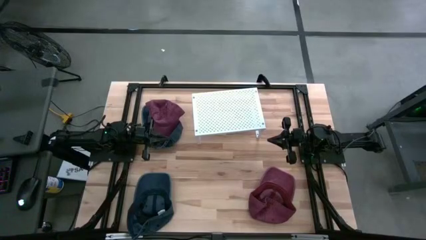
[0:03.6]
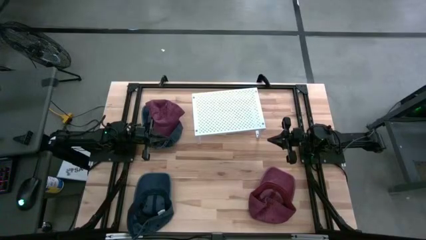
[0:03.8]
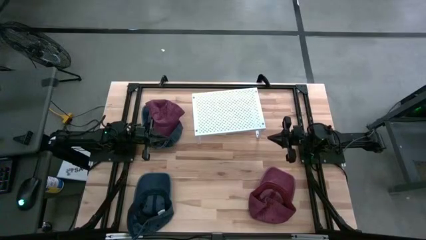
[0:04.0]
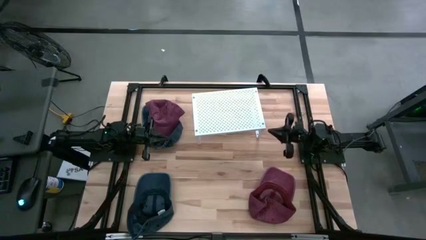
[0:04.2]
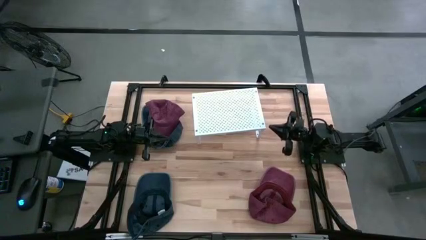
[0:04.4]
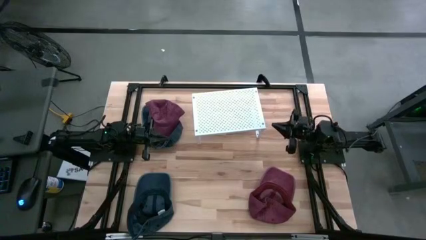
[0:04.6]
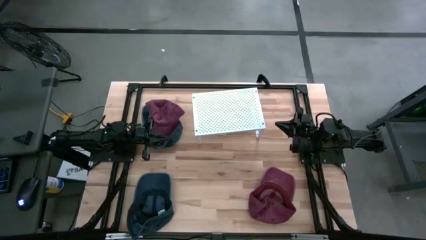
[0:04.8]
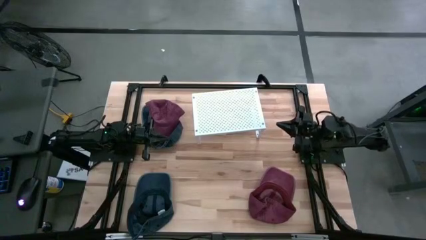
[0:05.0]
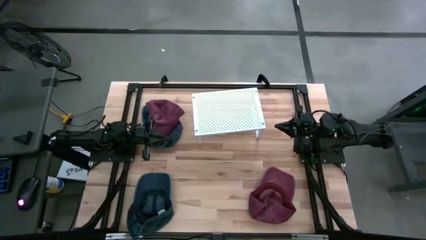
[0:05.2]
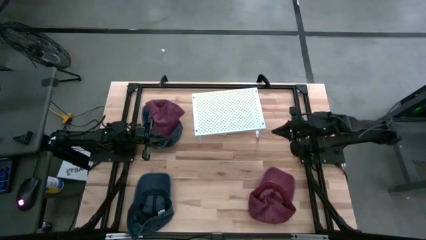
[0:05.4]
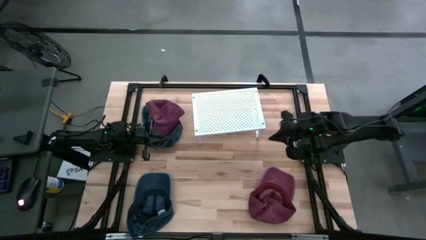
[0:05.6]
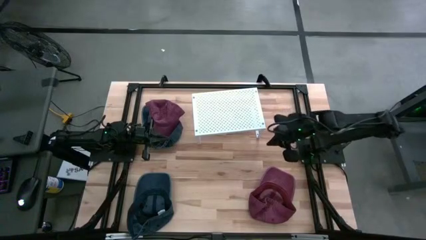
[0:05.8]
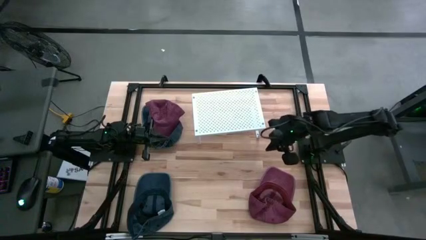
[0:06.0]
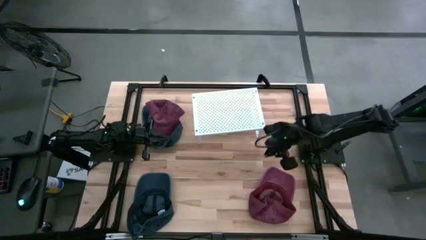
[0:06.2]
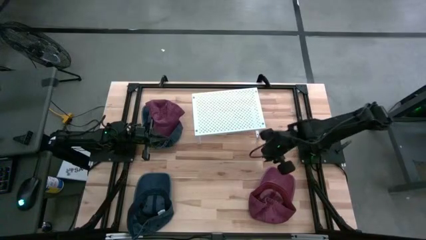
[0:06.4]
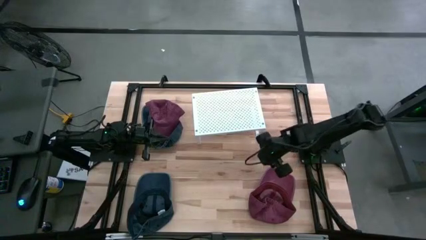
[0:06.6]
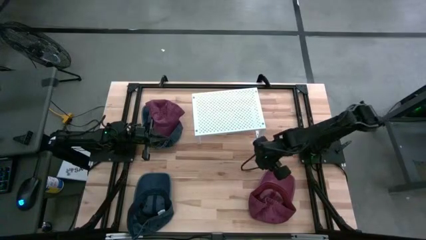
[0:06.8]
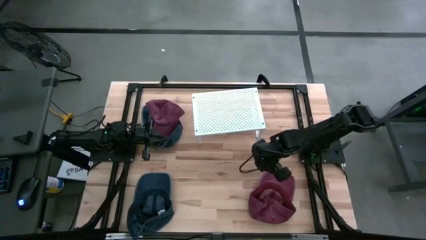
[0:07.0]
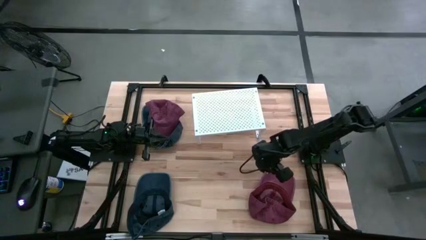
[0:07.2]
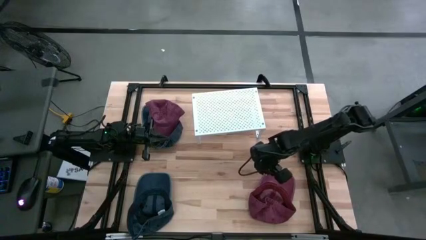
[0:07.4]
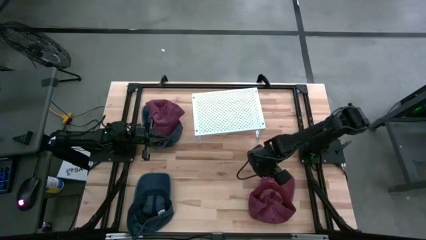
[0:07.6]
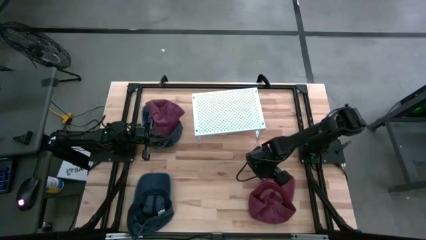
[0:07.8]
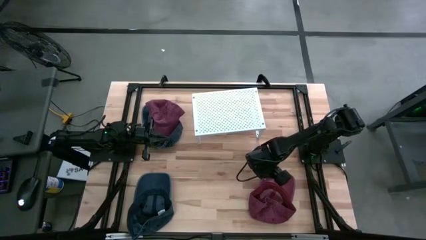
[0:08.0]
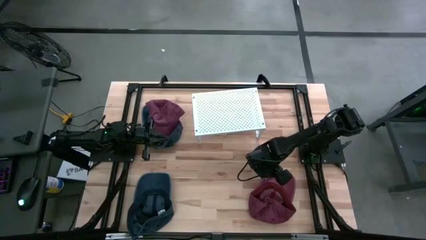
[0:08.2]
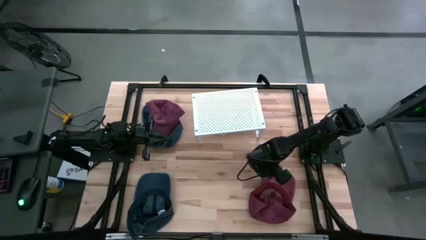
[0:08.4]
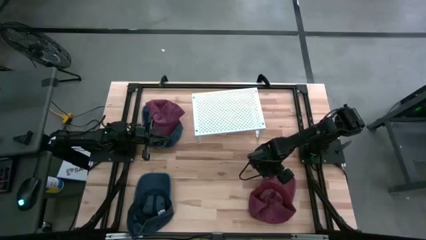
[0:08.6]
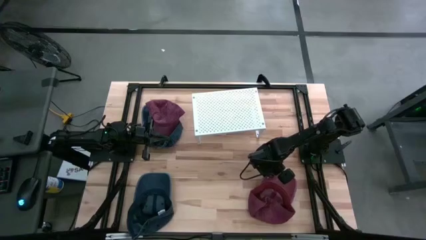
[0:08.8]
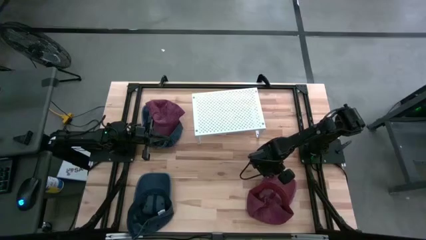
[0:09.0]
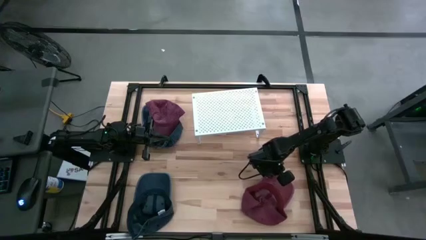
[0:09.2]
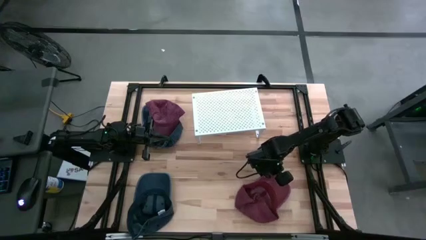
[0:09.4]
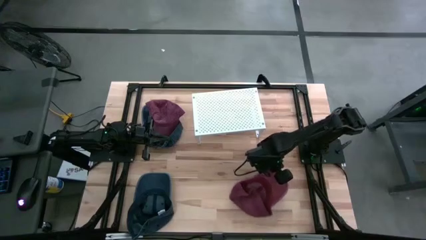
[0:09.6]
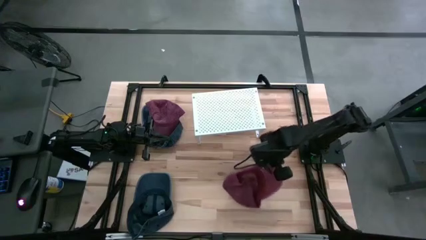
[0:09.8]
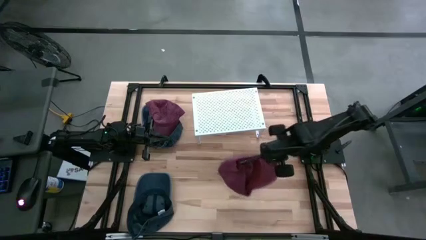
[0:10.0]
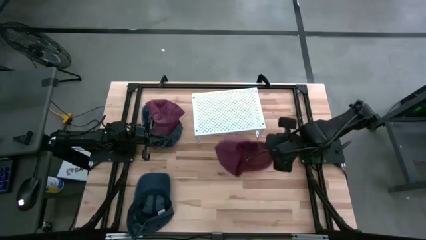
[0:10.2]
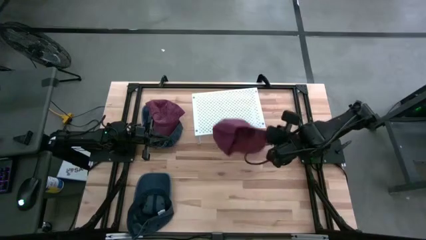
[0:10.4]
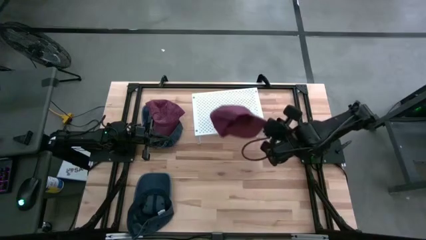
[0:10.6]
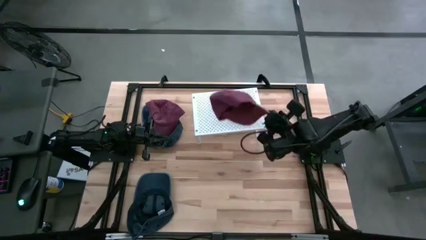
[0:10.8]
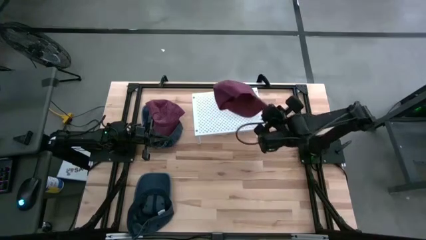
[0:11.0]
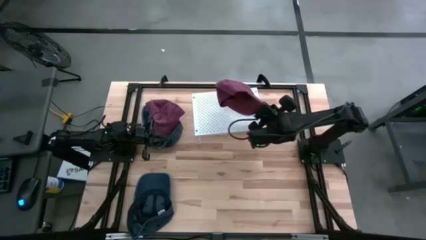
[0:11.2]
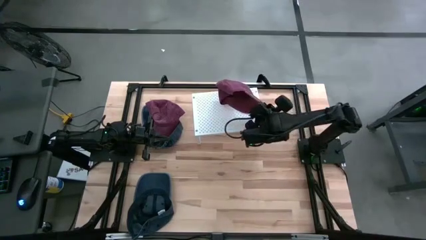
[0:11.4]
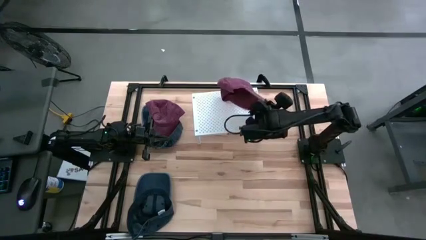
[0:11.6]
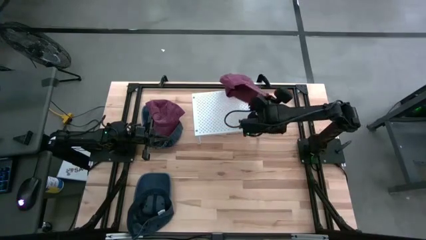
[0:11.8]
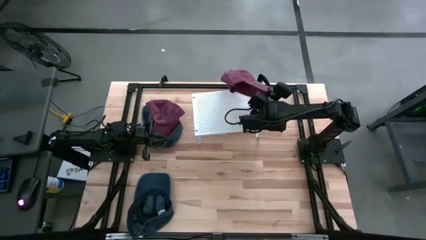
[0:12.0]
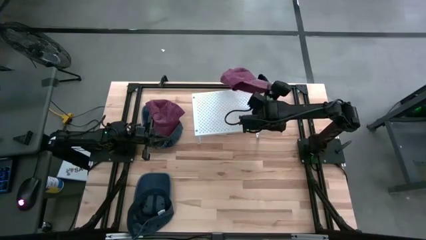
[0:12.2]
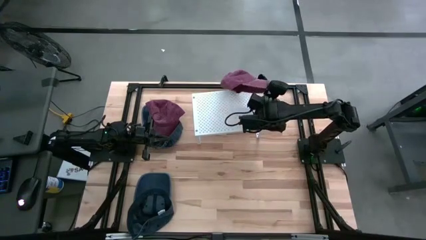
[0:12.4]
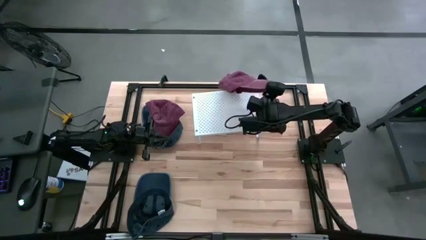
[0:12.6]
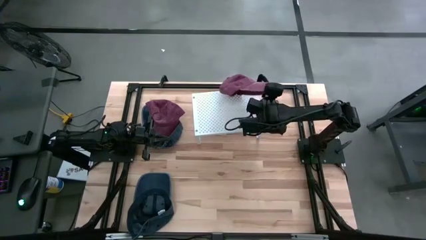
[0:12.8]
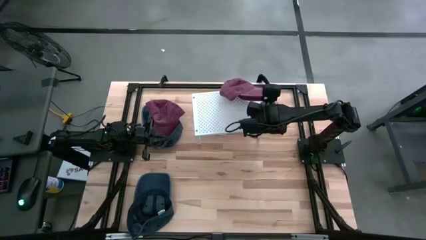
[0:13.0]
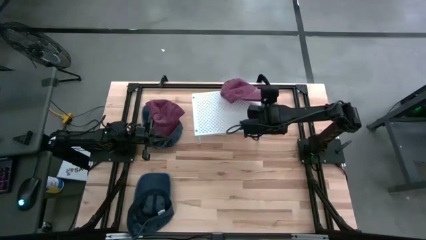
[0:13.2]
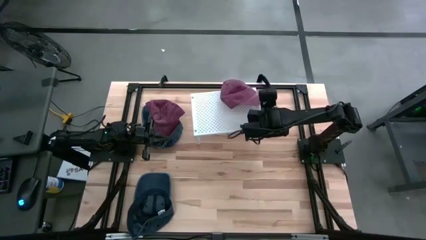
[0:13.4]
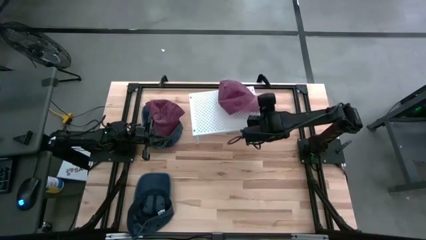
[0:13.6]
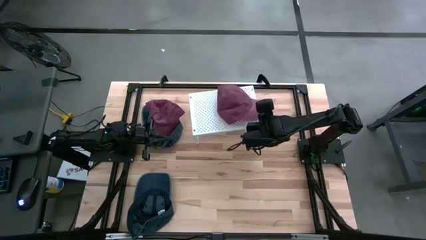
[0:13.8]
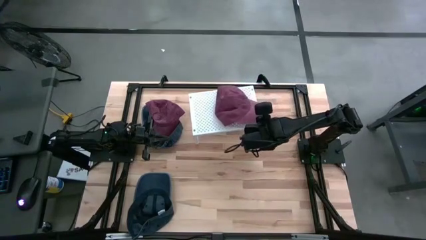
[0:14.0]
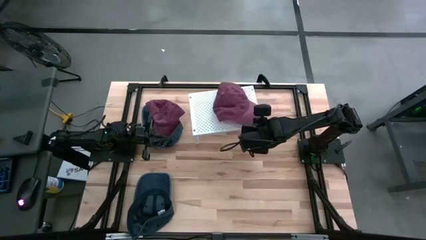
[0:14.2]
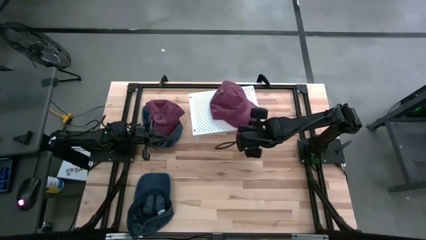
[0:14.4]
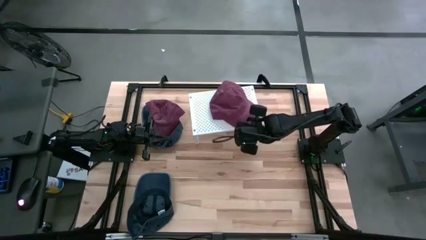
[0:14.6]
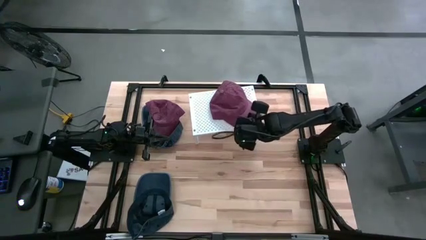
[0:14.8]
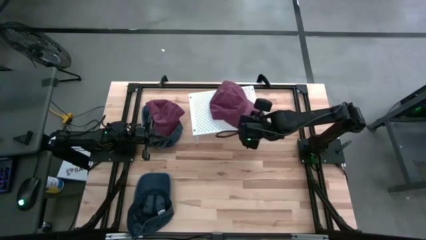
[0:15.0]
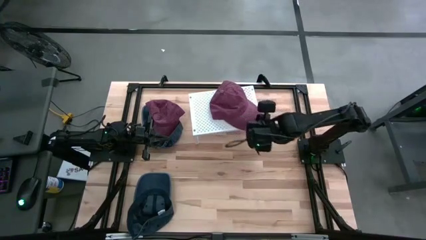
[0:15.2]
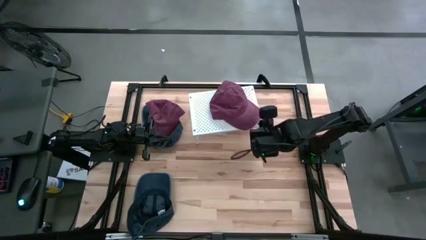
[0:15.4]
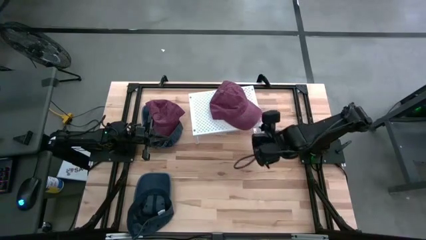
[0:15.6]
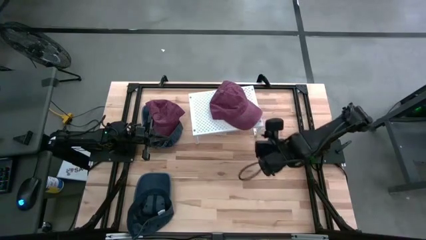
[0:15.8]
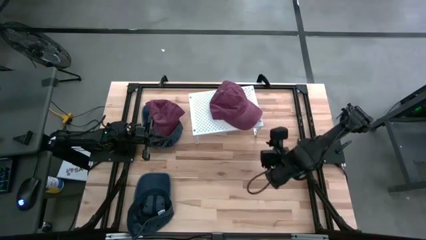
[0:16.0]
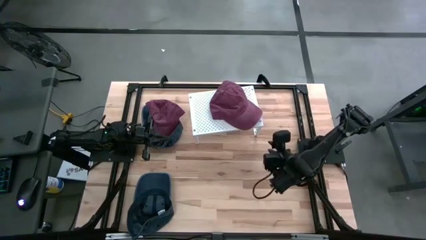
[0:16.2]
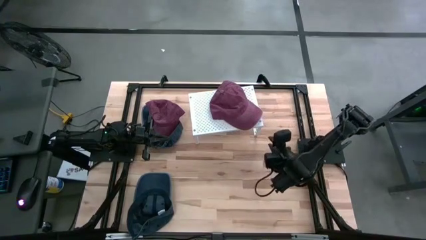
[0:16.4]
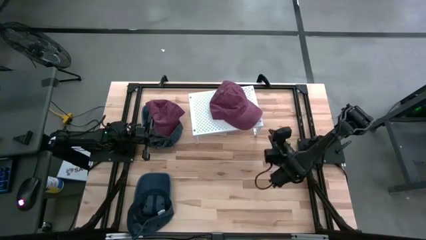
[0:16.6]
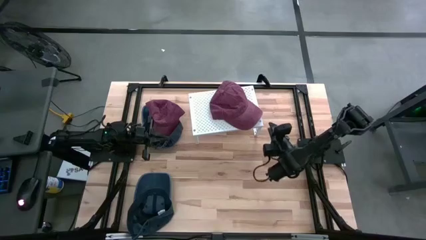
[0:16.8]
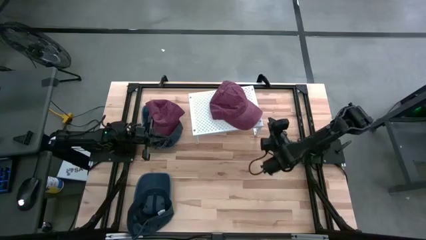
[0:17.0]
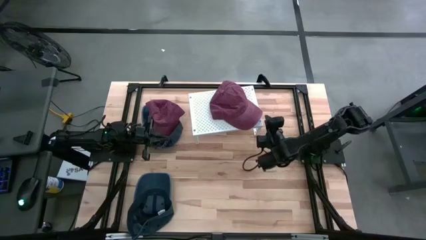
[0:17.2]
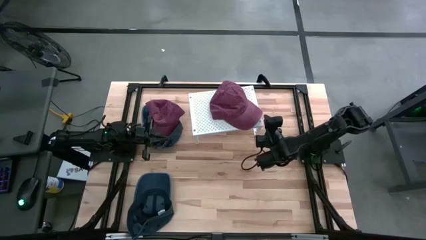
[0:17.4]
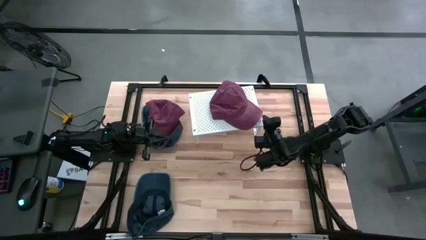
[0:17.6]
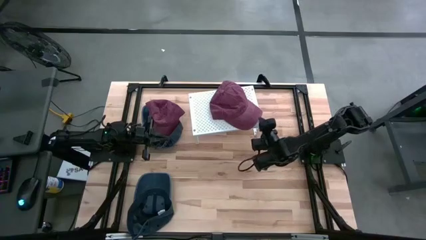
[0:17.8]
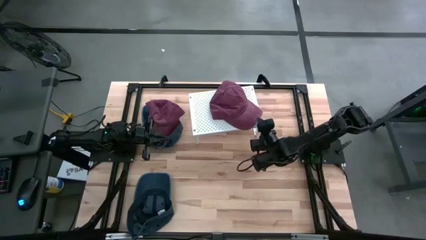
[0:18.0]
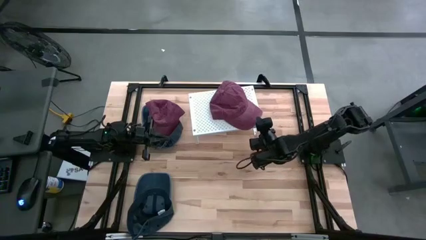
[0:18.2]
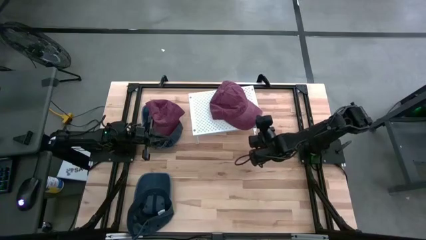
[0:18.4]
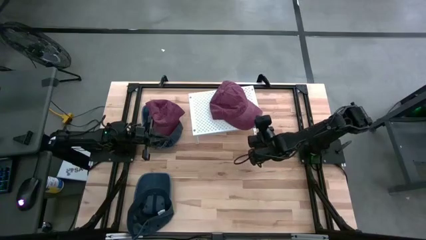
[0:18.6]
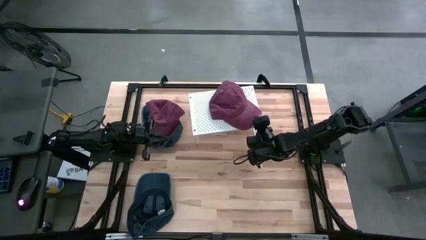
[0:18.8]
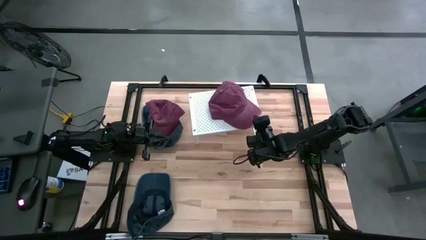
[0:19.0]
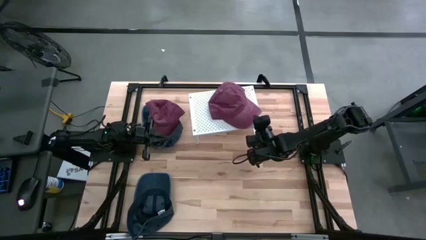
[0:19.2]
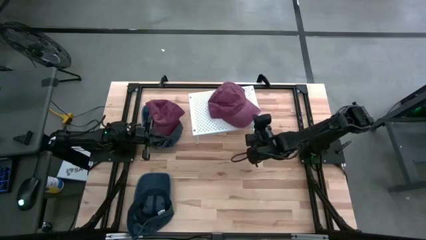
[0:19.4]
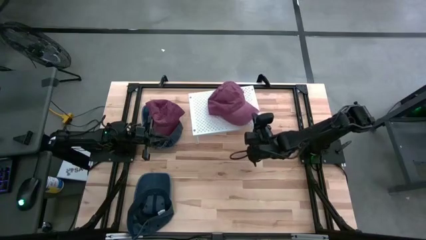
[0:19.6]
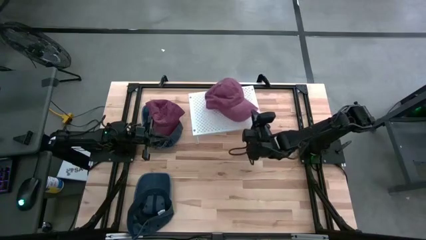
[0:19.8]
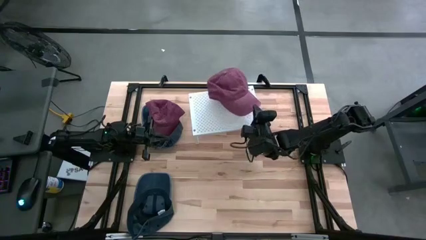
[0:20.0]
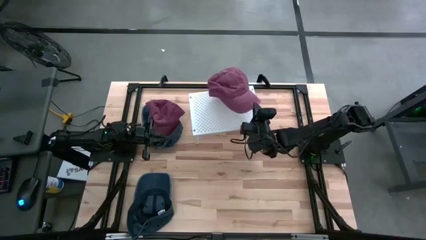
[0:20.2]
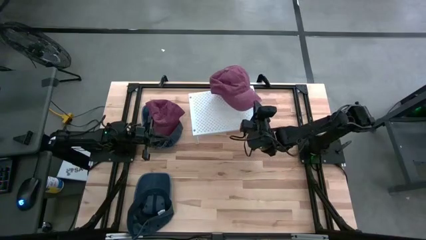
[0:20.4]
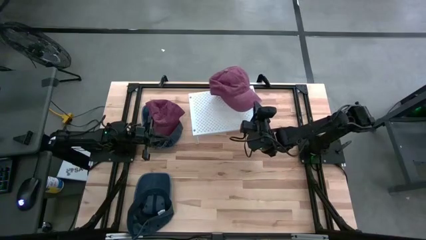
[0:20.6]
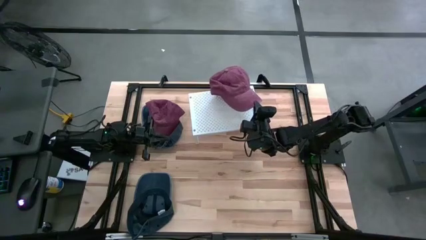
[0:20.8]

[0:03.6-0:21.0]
Task: Pick & Place hat
Put the bottom red cap on the shelf
